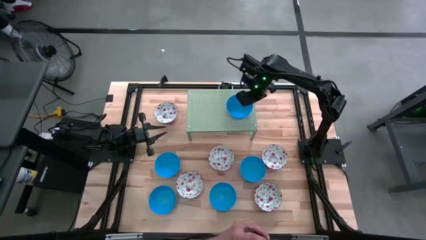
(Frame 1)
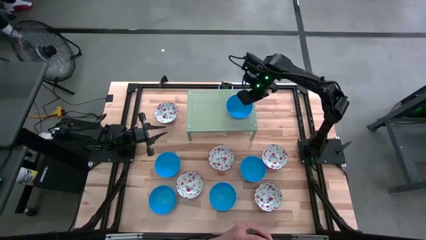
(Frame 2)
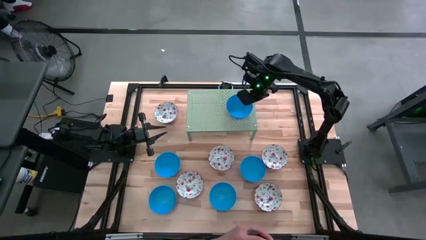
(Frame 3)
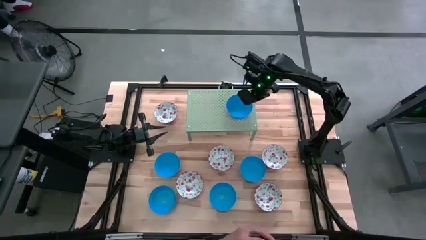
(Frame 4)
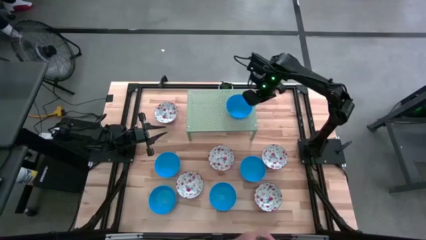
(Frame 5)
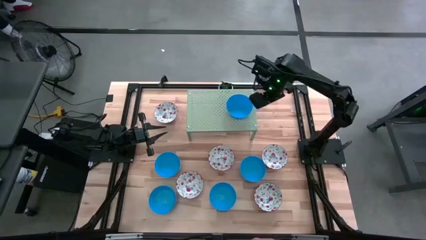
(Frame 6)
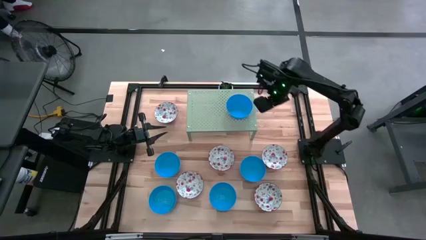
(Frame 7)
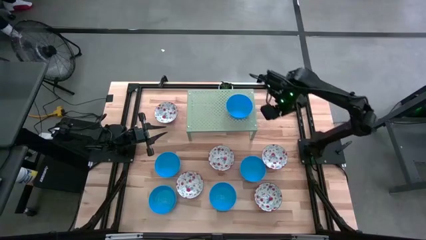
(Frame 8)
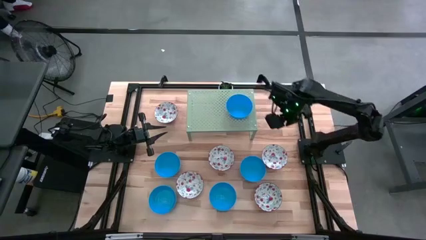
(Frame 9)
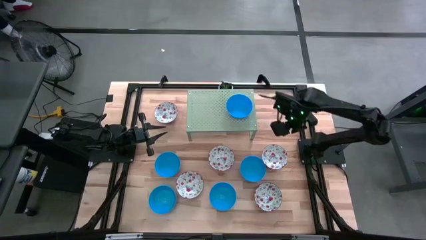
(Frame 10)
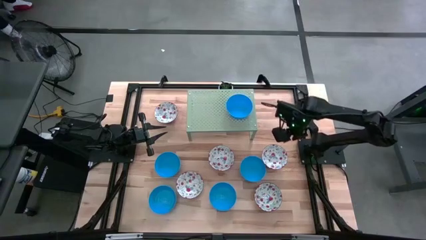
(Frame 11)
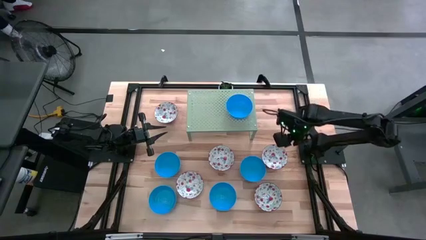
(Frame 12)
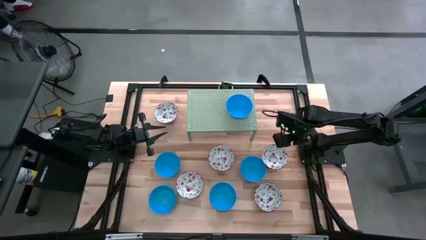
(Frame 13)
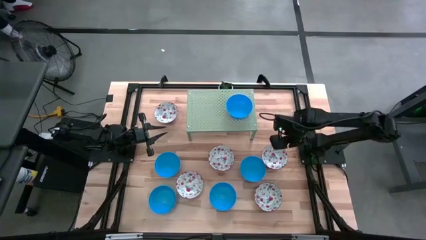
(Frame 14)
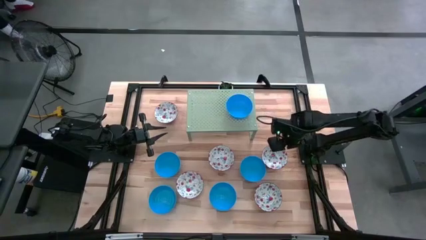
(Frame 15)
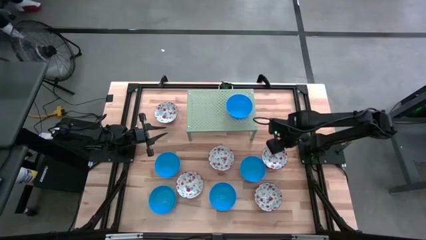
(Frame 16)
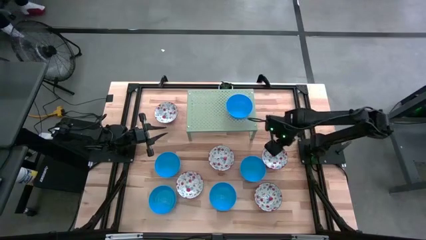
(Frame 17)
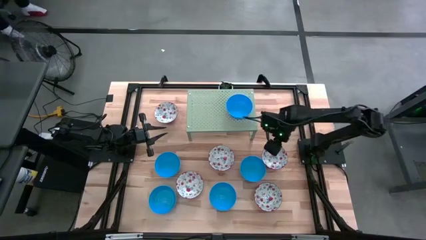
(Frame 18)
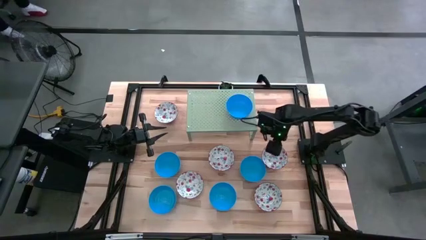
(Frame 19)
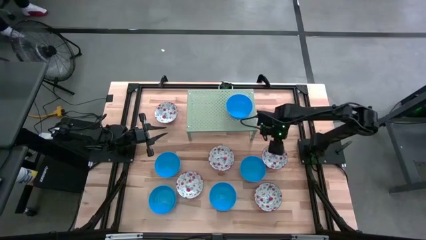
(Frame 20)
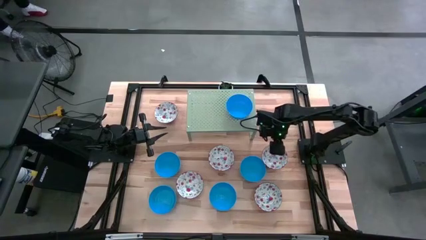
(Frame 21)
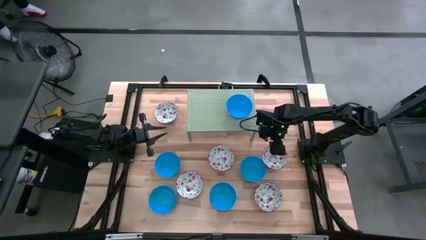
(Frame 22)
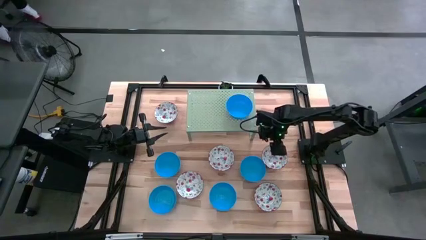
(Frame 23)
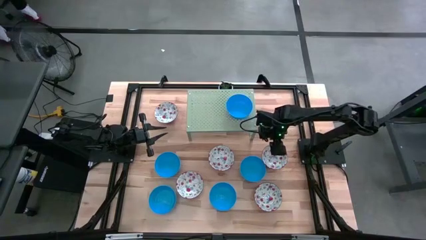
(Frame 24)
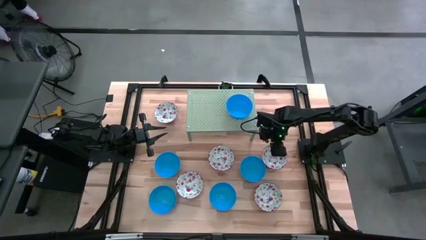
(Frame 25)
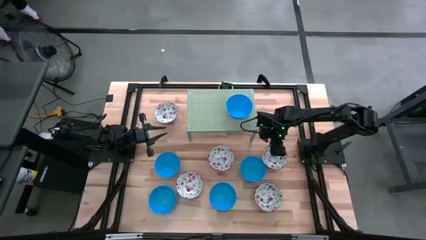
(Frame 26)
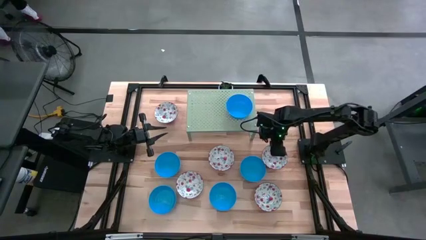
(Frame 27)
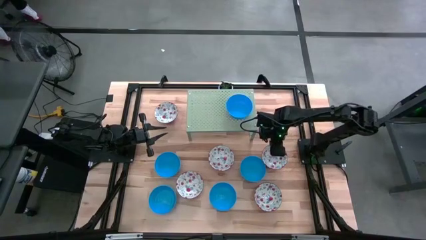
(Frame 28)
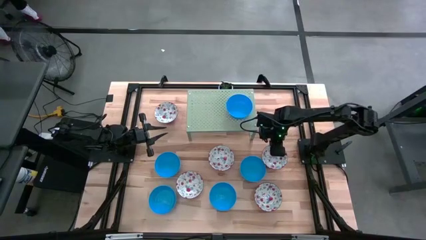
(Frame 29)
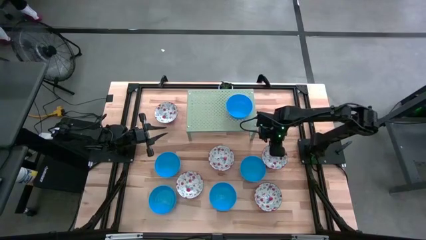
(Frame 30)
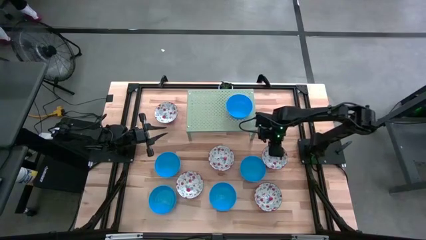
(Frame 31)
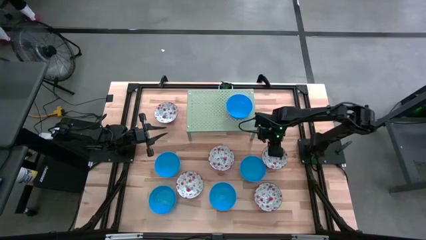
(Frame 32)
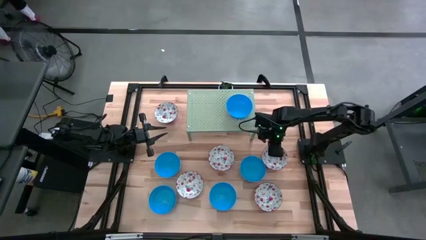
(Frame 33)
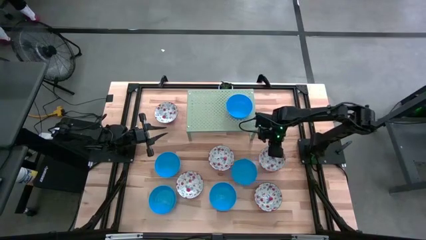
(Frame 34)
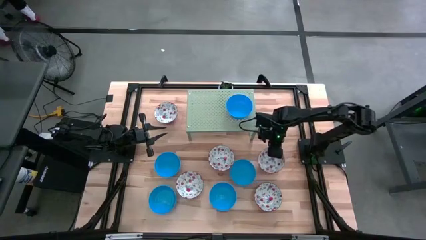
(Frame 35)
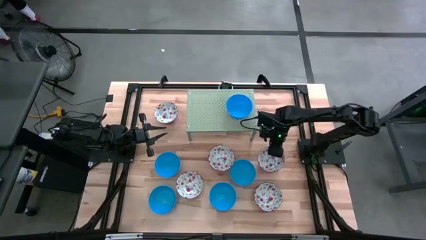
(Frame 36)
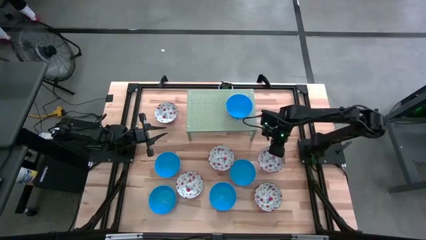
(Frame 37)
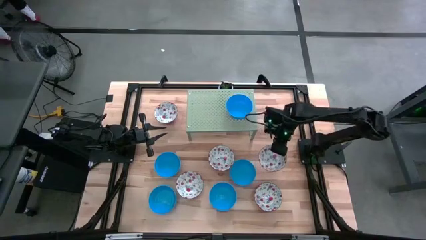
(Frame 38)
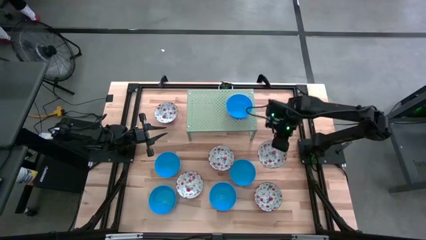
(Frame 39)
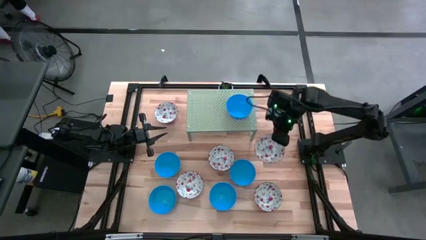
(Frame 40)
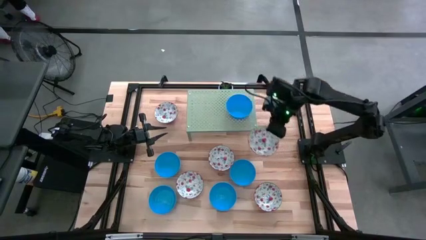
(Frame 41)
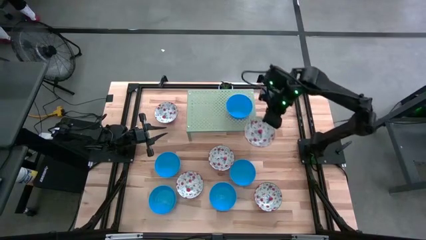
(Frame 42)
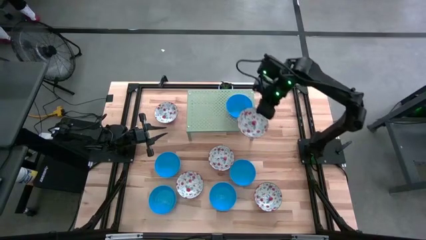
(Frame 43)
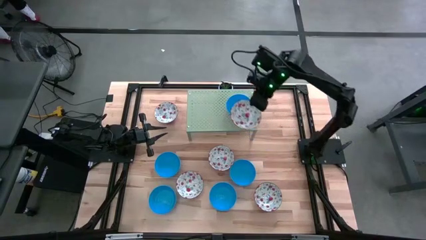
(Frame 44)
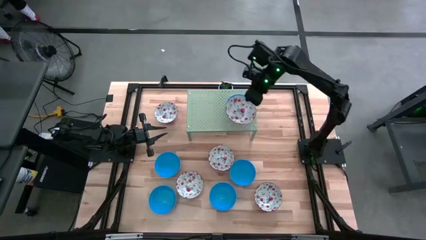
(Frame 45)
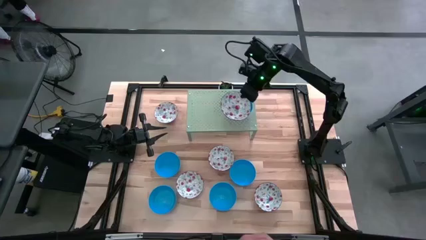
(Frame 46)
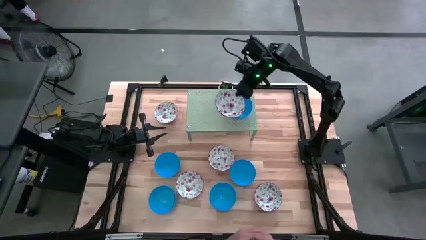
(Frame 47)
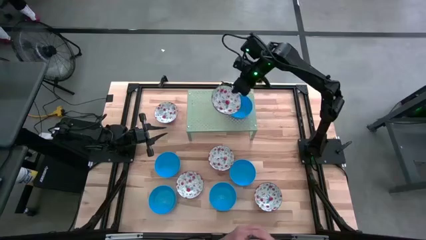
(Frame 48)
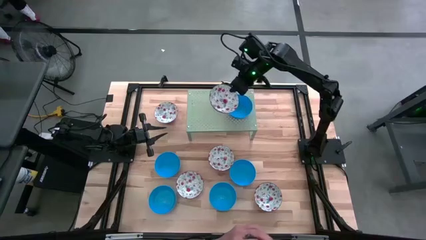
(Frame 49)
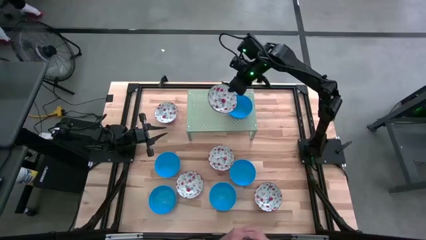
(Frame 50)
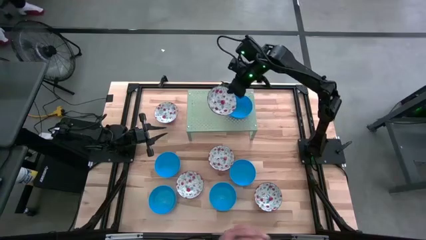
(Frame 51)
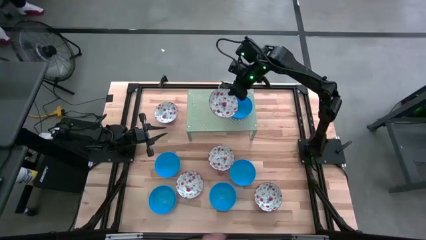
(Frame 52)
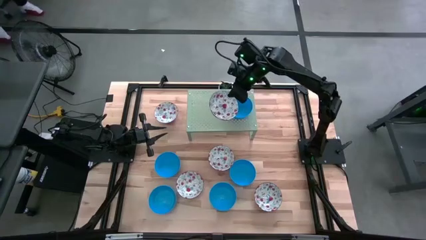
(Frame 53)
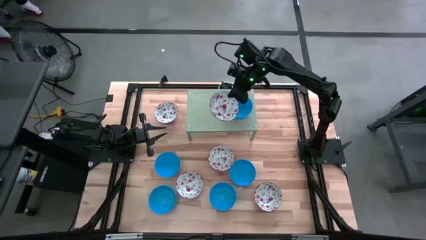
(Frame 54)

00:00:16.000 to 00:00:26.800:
Task: Pick & Place Mini bowls
Put the patterned red bowl on the shelf

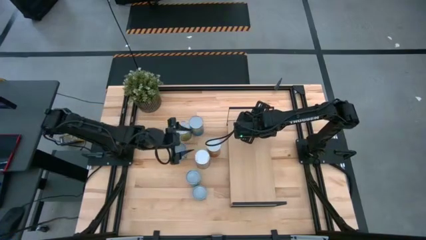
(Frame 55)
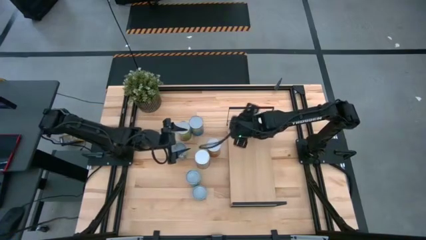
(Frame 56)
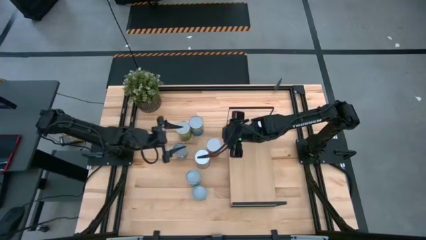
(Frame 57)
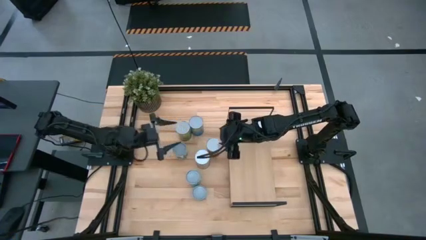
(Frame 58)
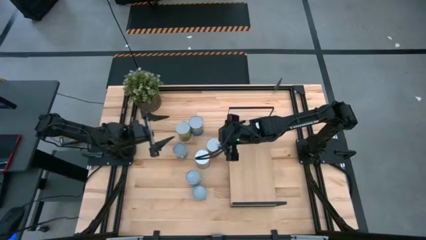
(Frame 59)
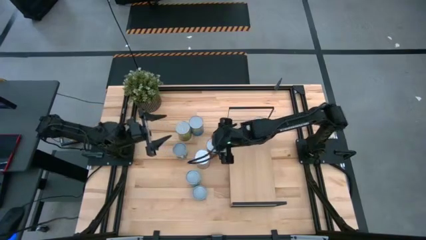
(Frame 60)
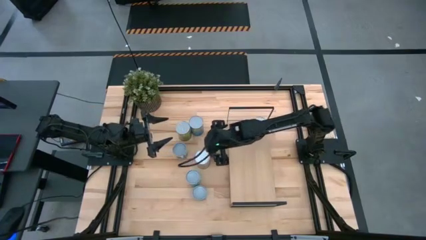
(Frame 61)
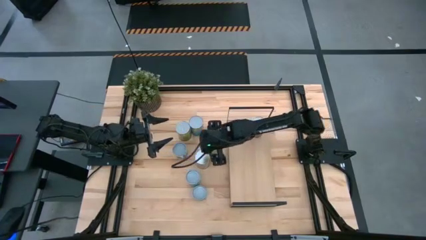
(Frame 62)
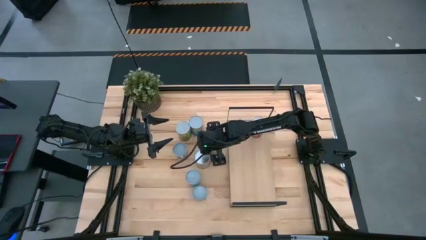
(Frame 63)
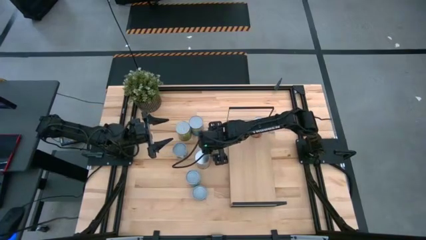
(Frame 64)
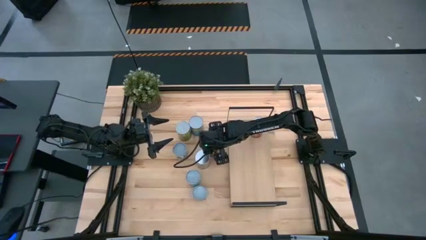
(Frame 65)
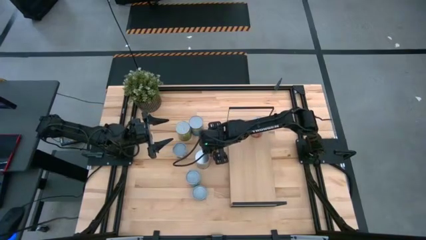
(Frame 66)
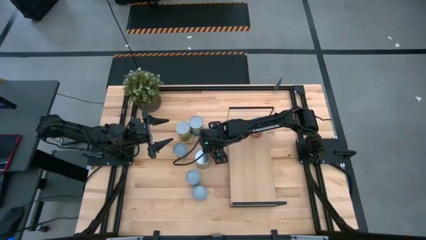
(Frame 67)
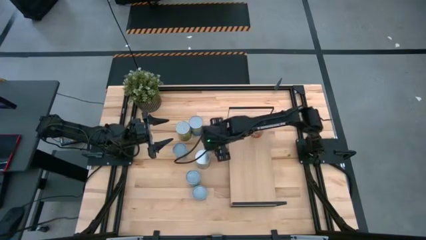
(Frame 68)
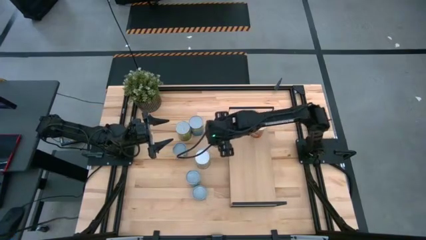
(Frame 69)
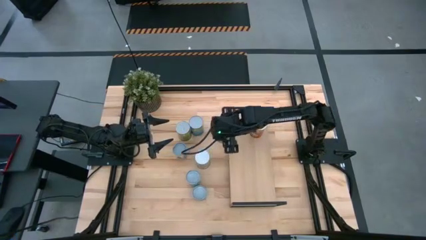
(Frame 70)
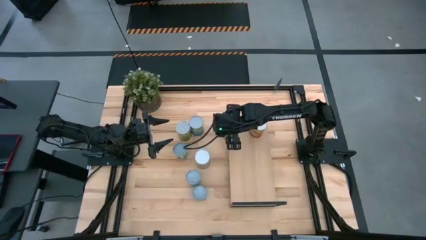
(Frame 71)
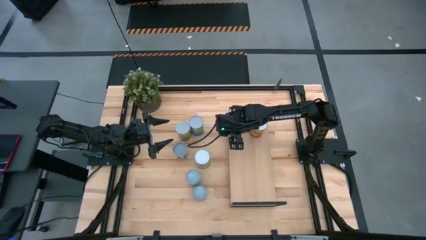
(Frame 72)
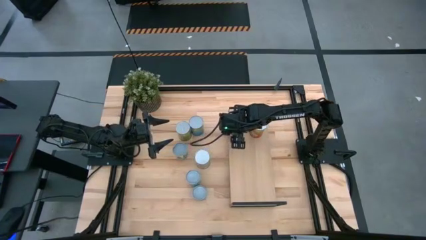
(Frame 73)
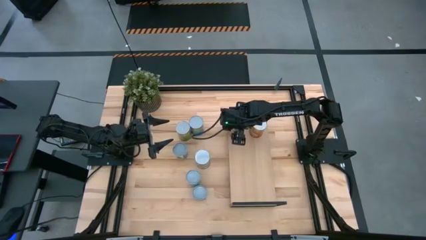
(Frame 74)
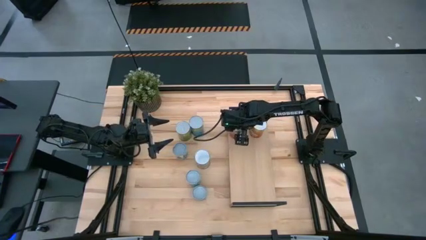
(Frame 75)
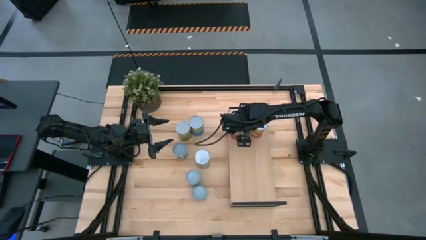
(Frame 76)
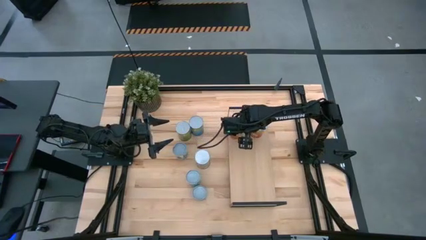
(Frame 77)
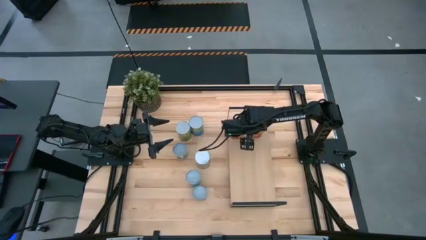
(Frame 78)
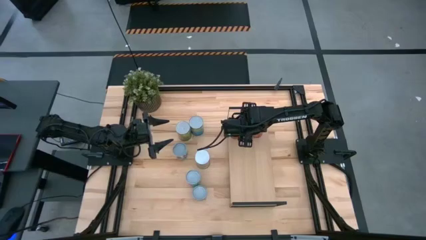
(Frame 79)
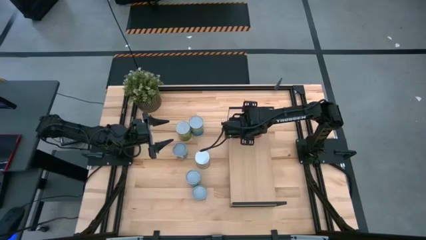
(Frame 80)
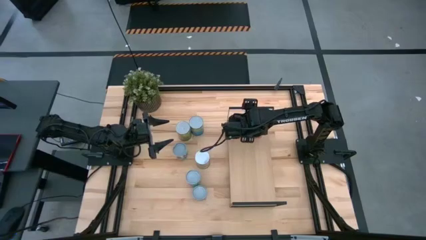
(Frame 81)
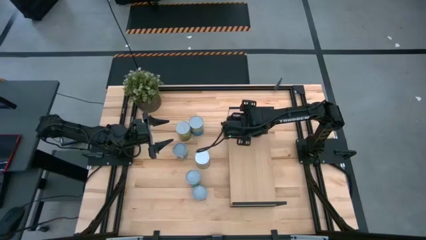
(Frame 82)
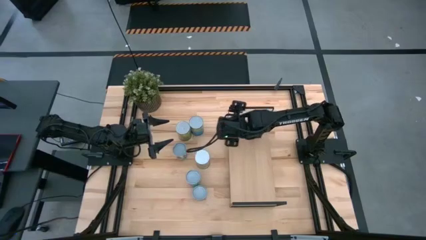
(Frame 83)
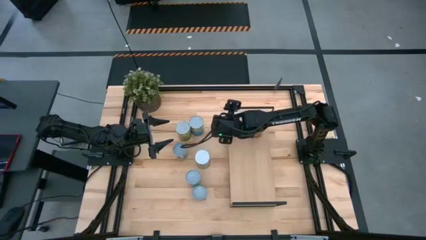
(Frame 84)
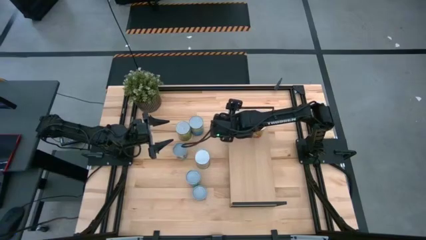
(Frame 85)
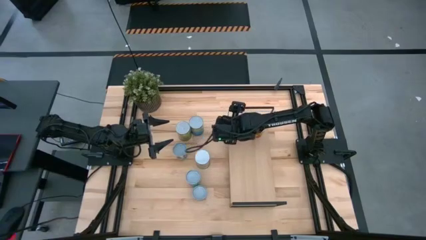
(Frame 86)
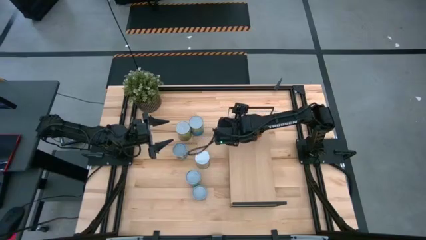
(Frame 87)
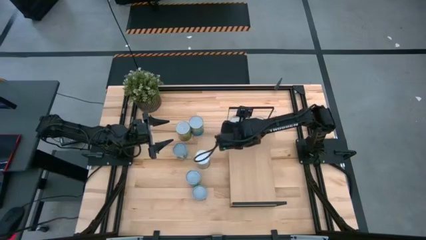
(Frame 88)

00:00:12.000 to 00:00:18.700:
Task: Pick and place cans onto a shelf
Put the canned pineapples on the shelf
